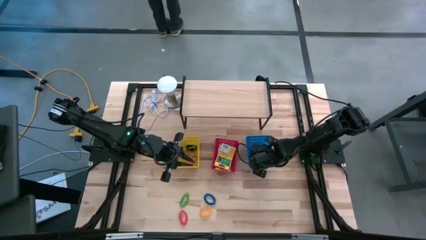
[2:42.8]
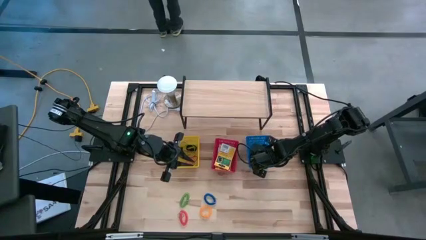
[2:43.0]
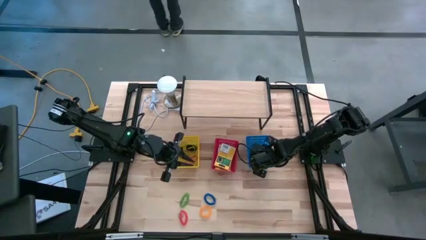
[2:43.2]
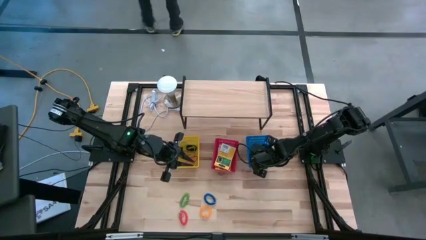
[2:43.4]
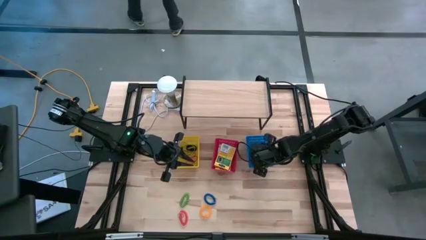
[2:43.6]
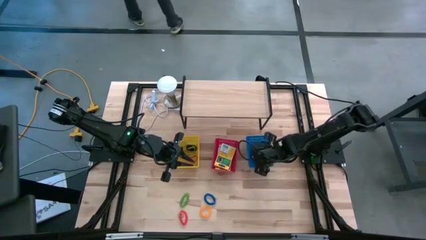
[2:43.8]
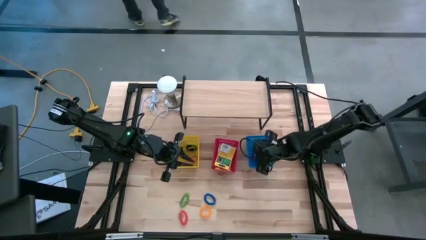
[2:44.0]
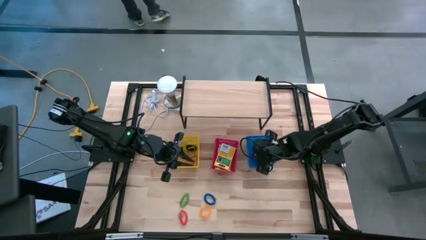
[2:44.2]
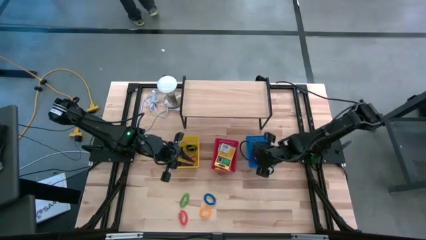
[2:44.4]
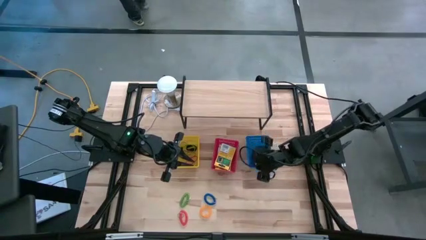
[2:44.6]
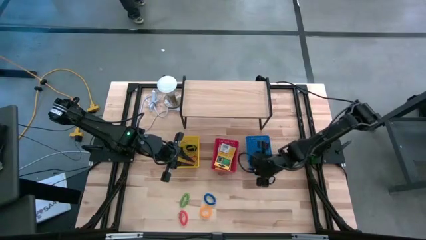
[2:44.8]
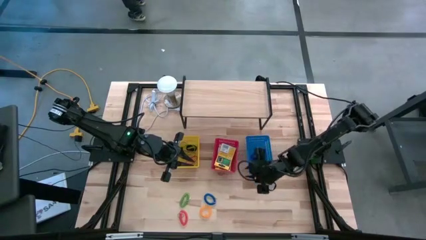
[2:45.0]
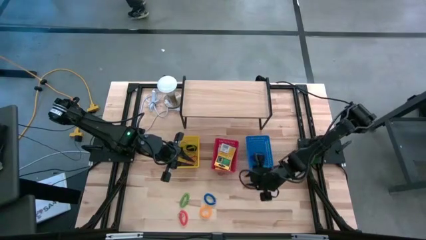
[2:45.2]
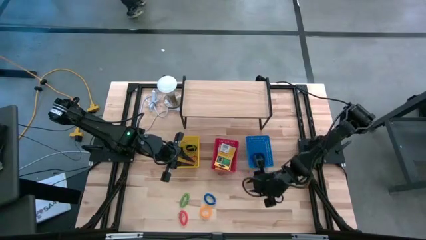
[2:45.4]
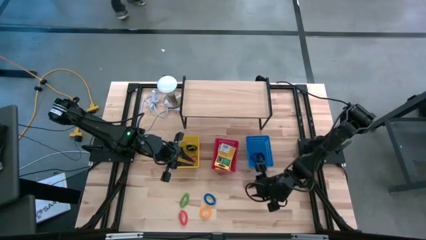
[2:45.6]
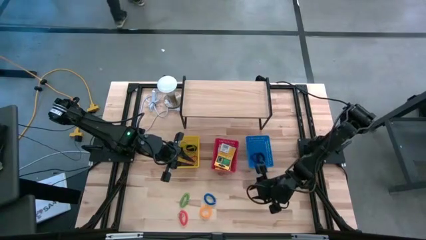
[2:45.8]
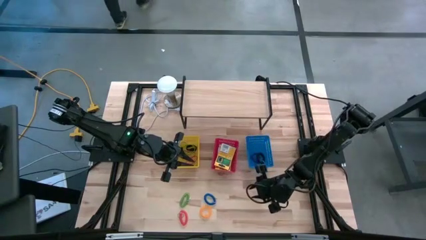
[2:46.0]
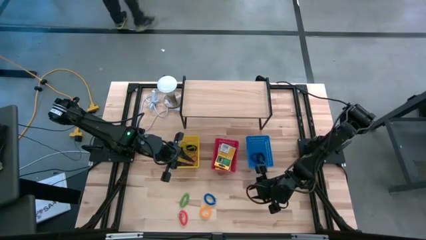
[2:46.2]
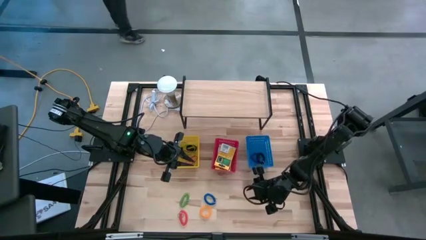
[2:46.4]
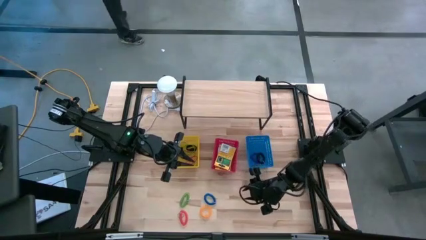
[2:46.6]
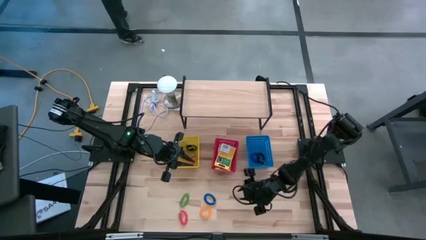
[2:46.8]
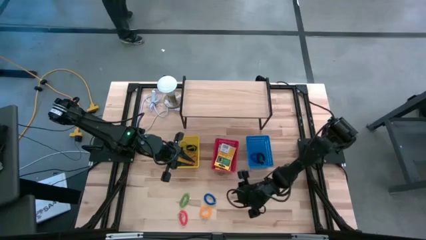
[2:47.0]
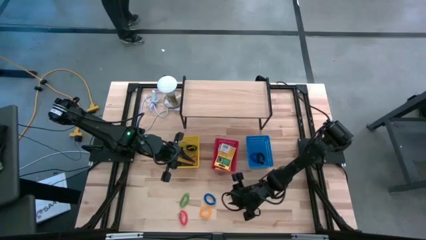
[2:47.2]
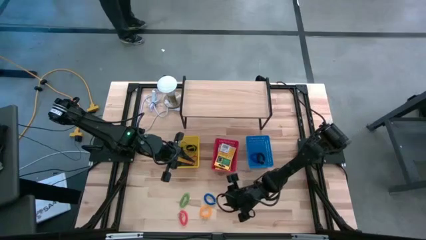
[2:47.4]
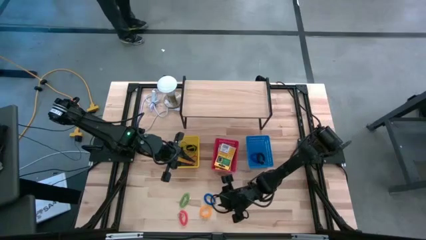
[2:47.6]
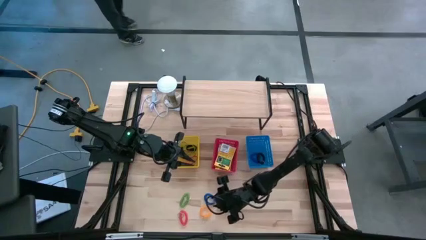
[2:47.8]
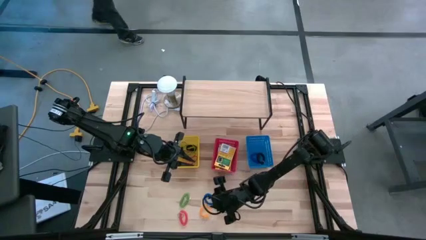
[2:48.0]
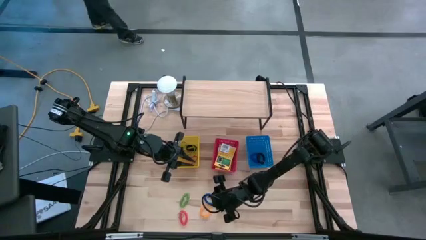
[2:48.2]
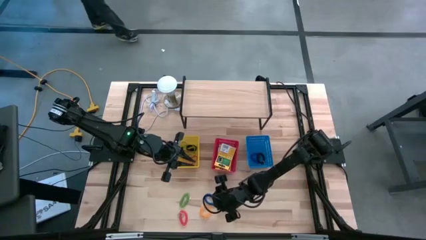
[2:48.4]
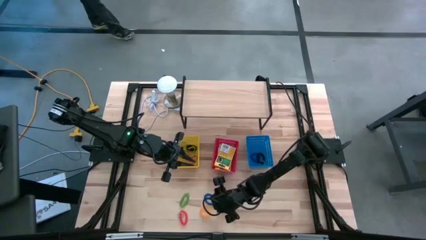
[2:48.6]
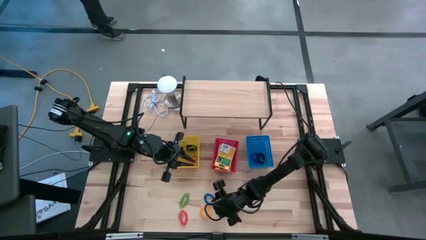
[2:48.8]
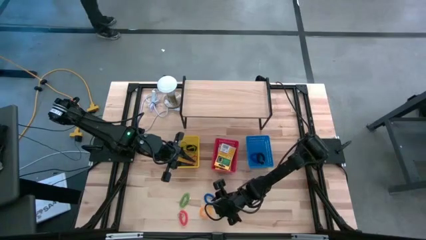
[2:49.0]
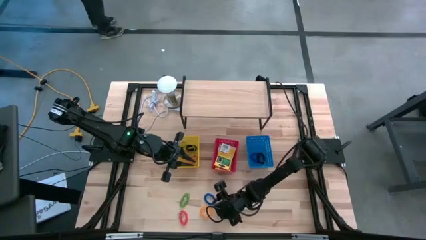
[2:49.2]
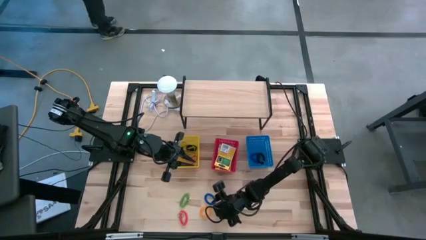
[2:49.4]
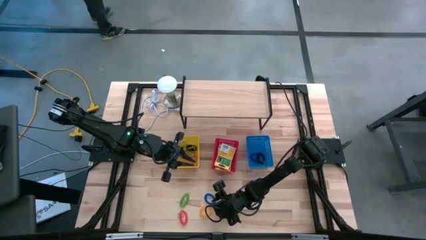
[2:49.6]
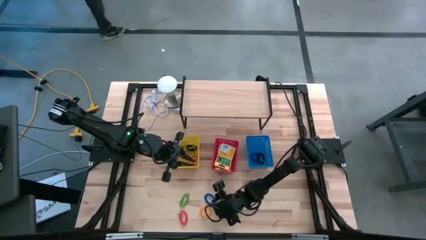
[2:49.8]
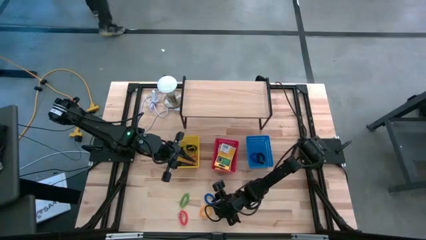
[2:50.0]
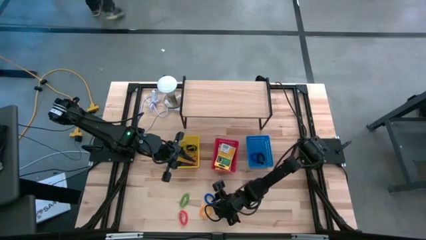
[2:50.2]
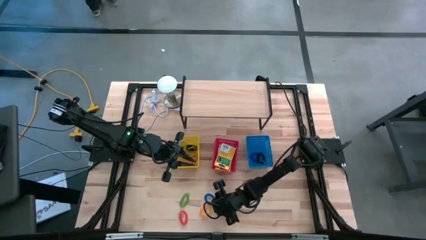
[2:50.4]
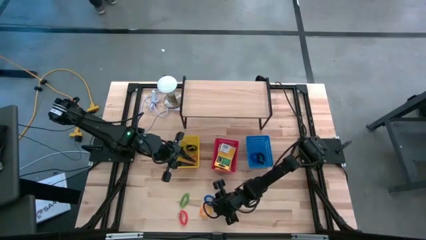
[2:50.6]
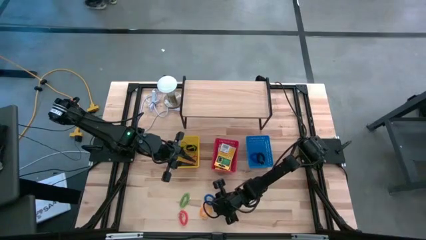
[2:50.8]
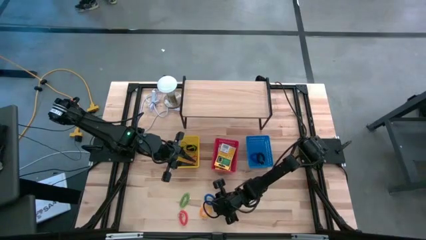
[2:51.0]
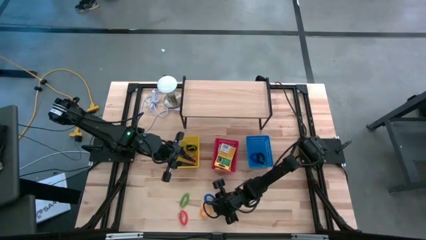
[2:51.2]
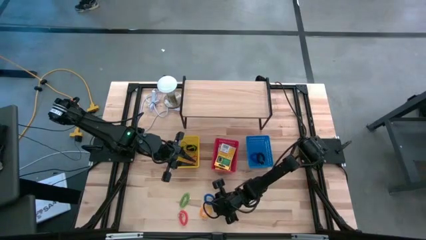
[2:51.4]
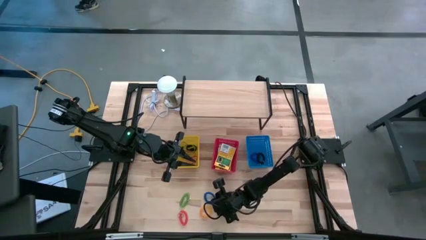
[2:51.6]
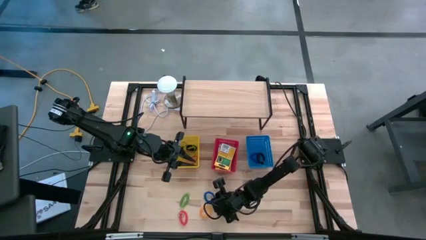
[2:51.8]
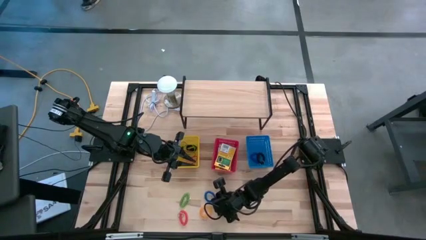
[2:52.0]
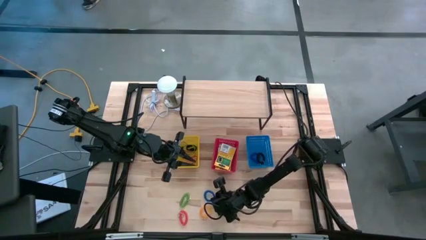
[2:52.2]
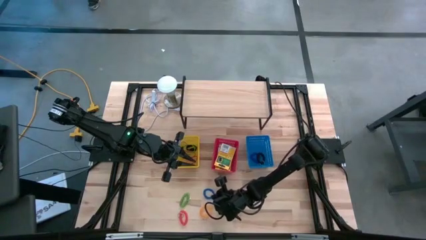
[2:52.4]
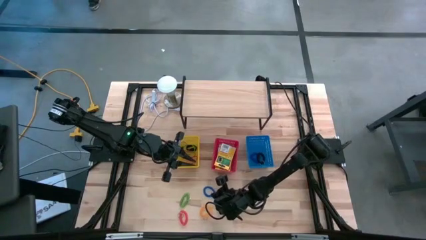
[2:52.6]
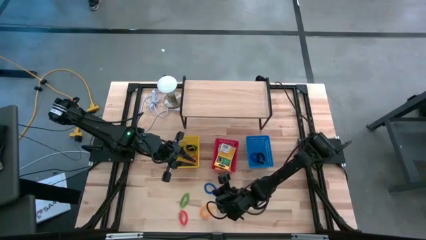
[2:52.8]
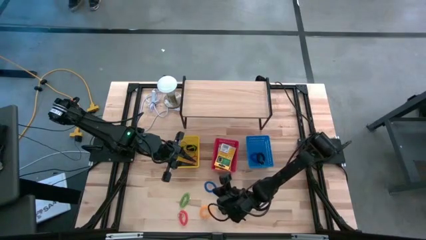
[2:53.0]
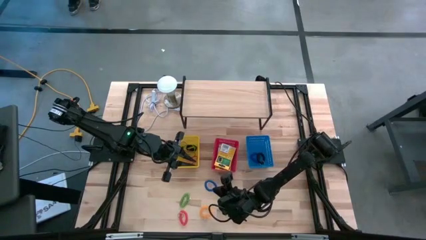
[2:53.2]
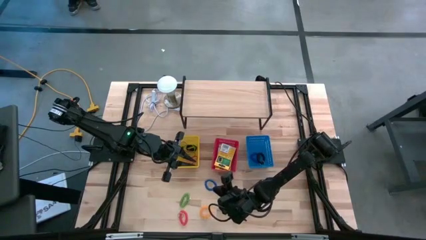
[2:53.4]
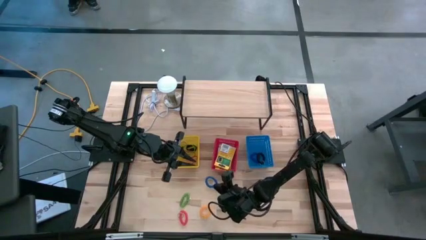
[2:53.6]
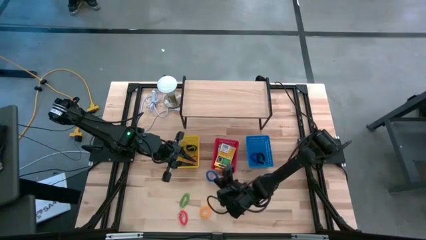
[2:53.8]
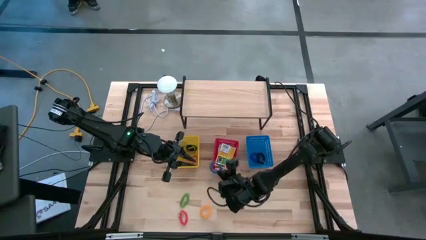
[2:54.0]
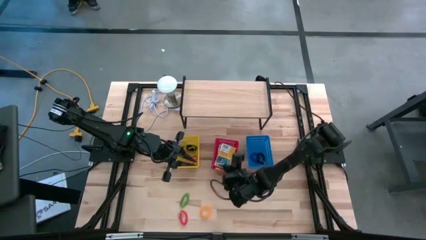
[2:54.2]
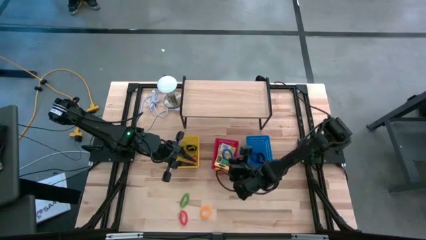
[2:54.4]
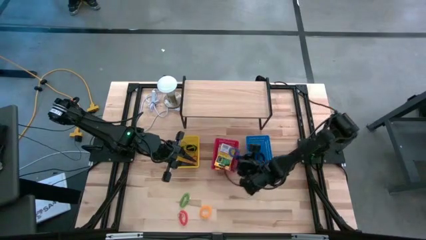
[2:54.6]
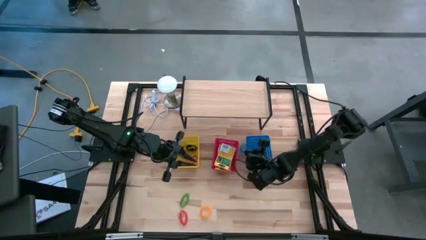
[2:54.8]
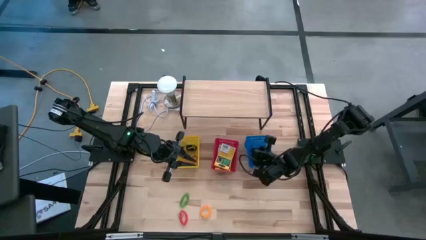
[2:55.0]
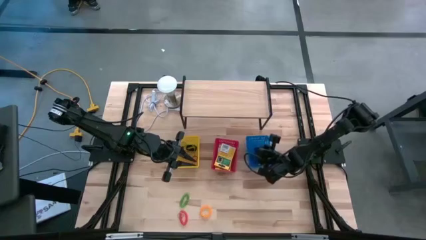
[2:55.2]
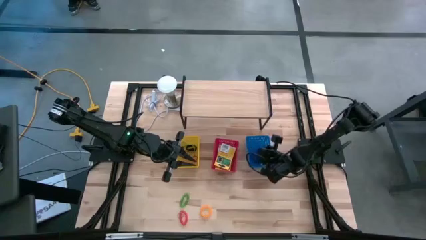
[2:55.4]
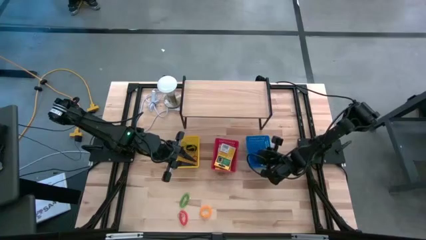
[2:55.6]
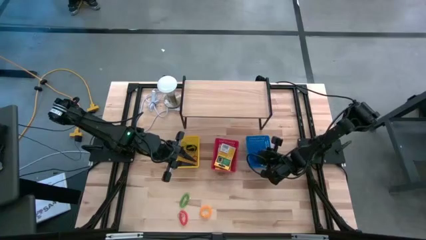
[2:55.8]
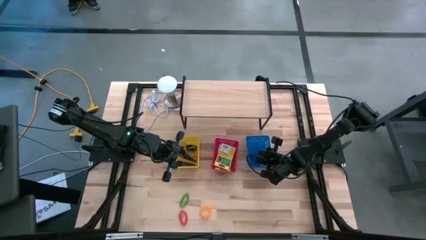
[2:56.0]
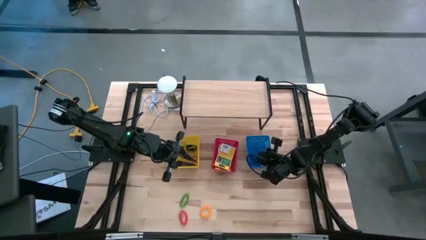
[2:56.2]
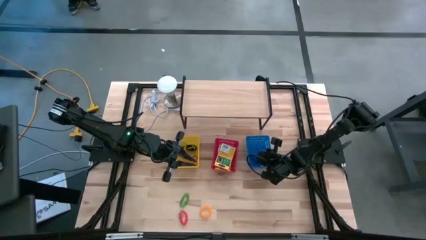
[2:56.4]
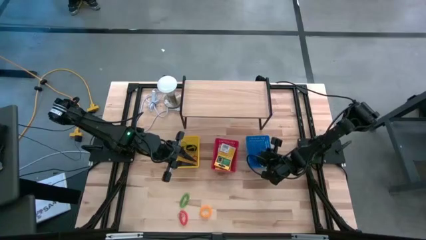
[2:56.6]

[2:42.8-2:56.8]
Task: Pick & Place Office Desk Supplies
Put the blue spiral keychain into the blue bin
